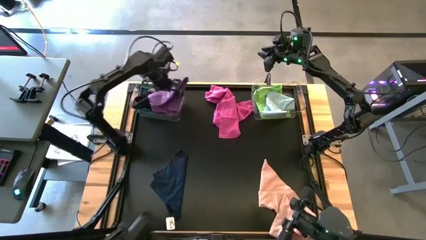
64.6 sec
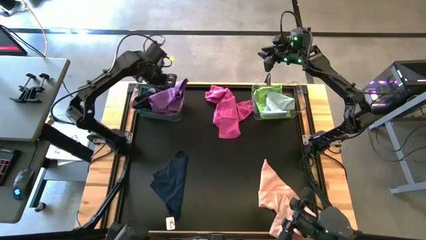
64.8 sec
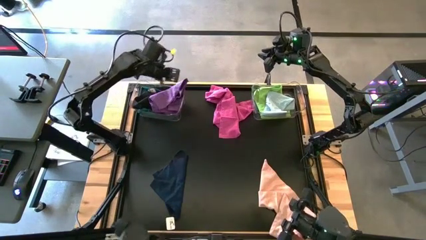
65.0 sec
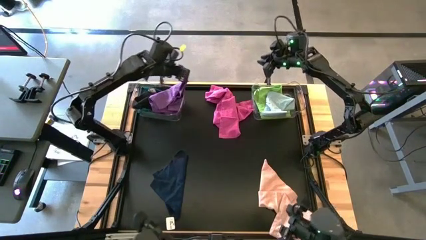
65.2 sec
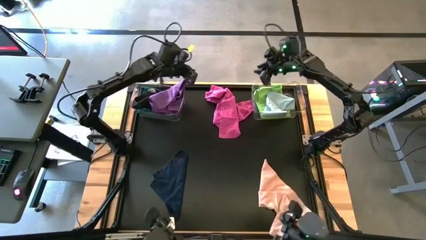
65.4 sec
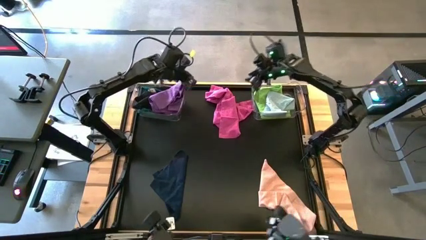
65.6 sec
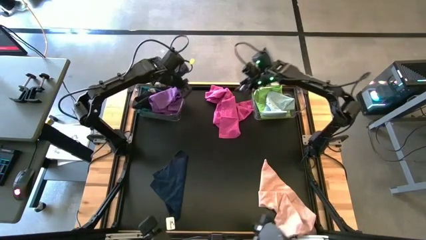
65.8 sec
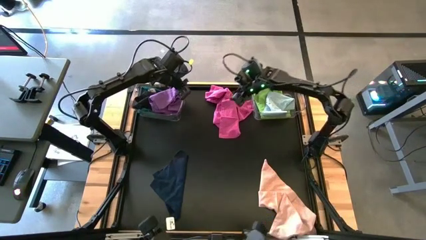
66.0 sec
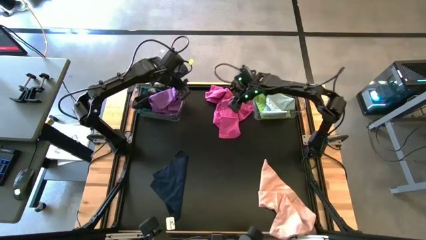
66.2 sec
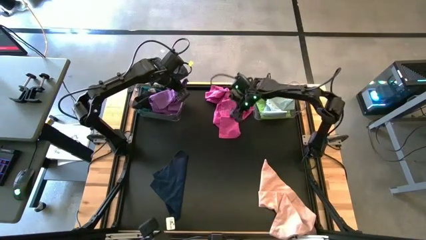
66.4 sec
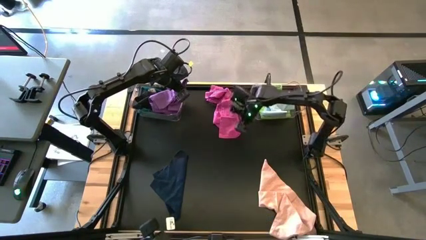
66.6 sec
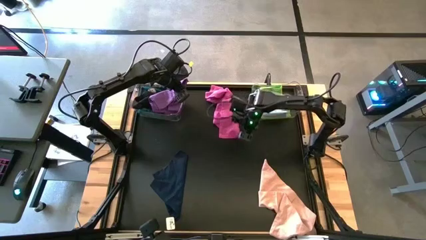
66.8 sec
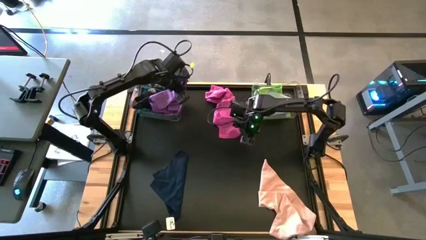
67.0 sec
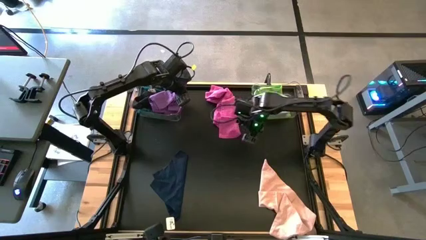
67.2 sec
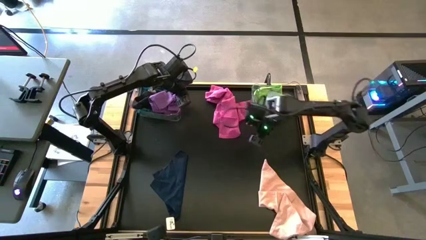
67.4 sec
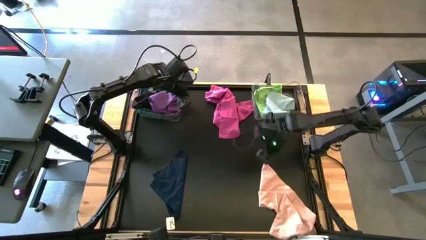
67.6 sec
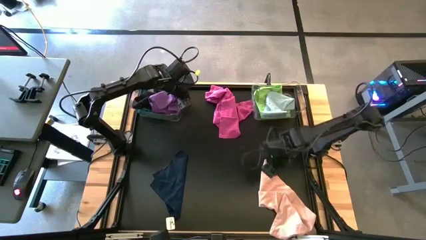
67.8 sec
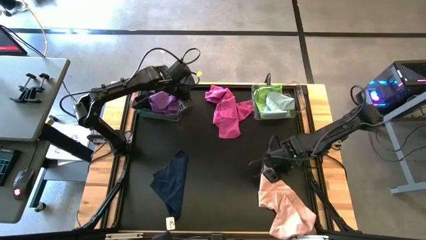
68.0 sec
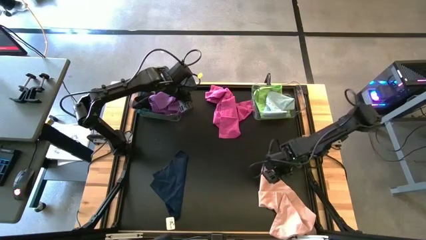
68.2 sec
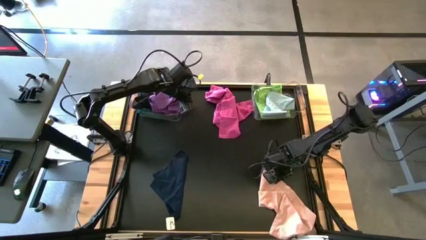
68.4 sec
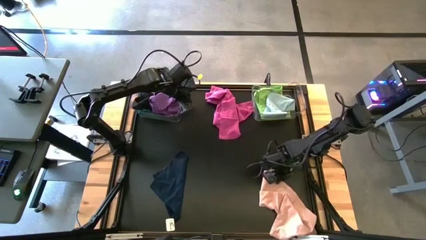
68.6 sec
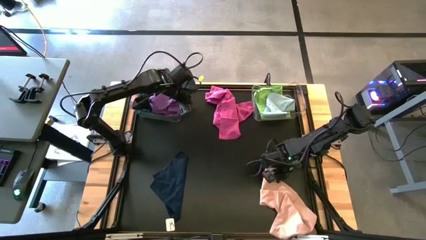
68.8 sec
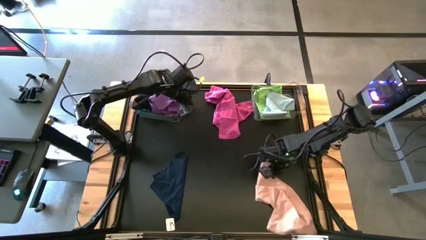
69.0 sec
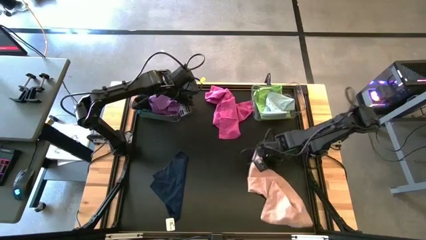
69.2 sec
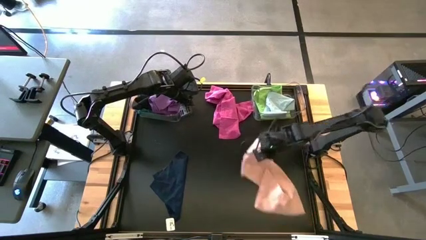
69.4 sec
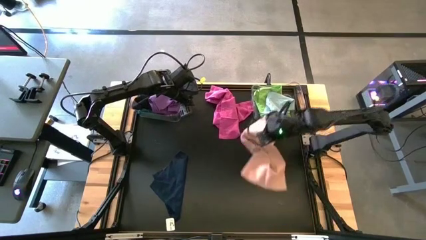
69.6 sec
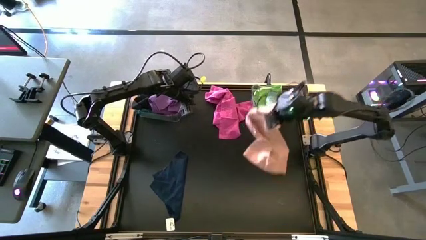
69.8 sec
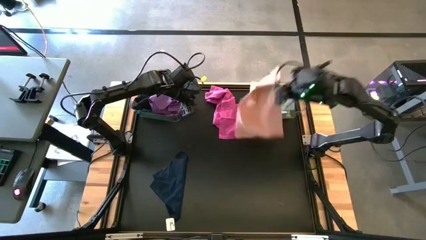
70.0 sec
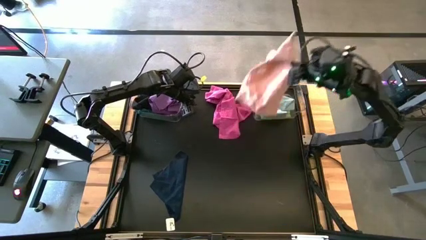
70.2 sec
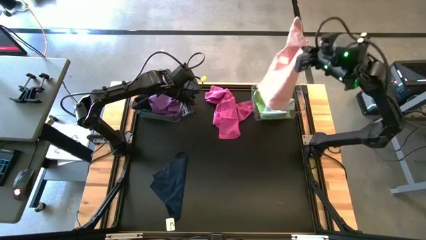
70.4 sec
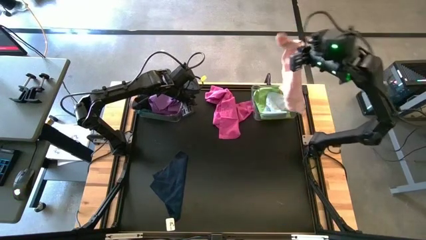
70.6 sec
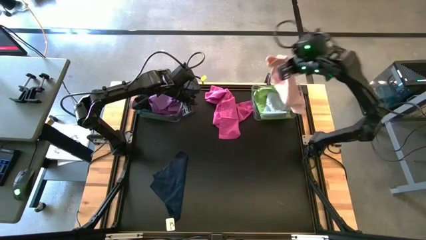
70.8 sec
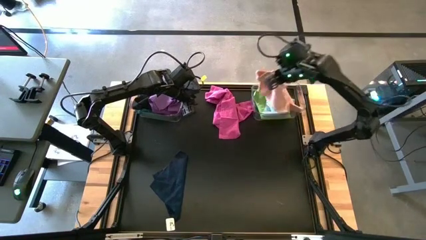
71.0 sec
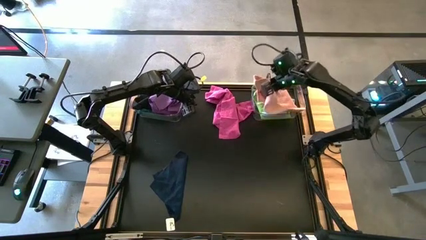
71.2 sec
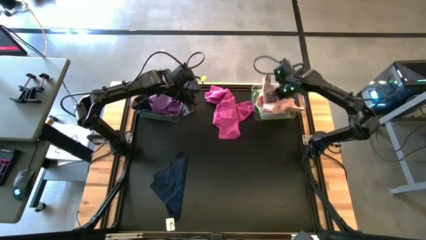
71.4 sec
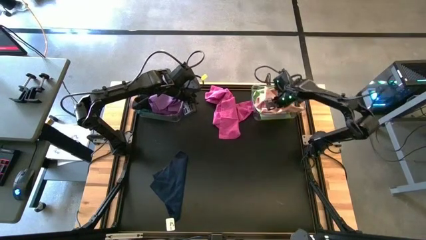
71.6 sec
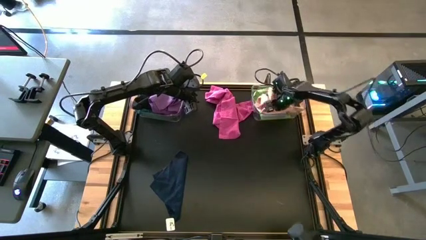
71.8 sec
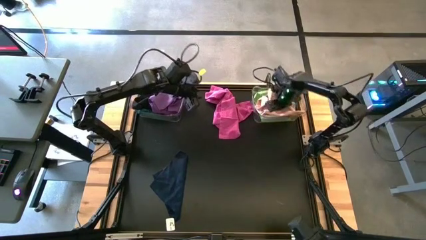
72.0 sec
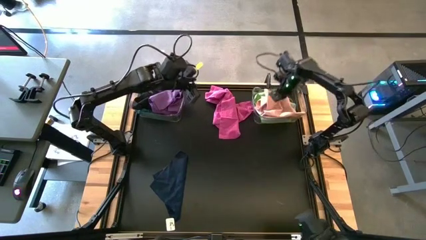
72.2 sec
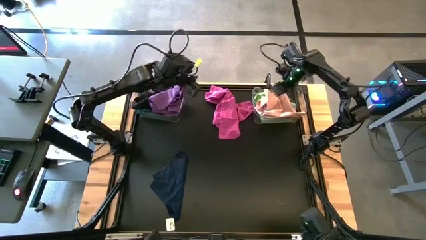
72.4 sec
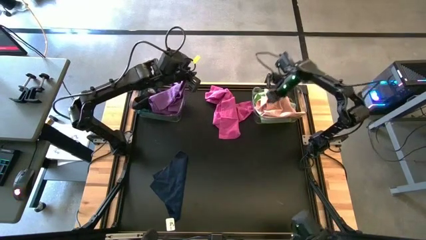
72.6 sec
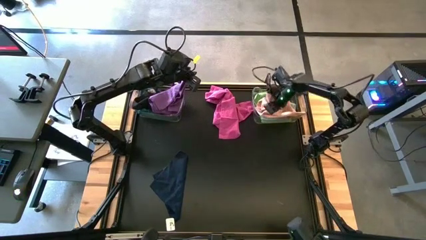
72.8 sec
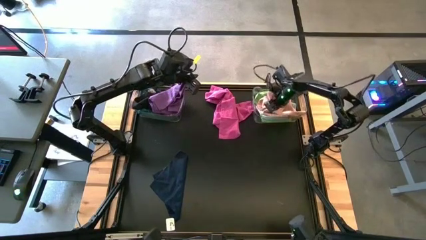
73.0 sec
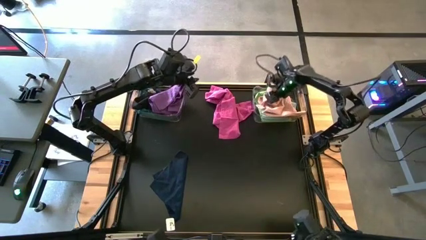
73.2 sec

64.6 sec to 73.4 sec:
Task: Sort towels by color in basket
Put the light pink microfiber towel into the right transparent bin

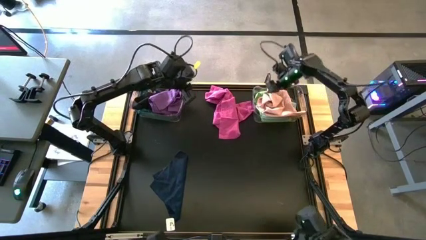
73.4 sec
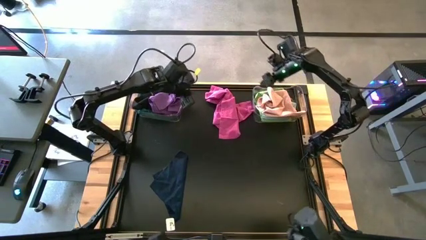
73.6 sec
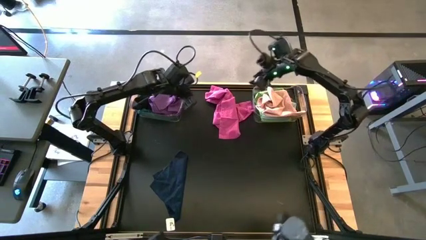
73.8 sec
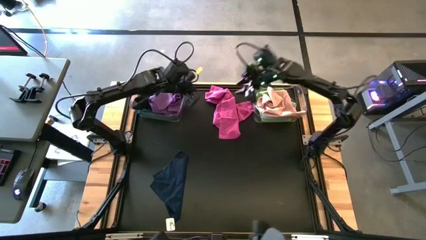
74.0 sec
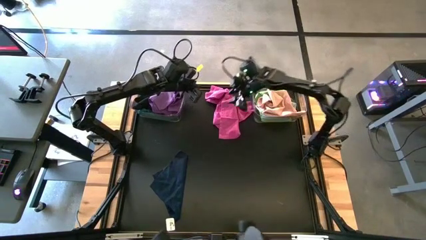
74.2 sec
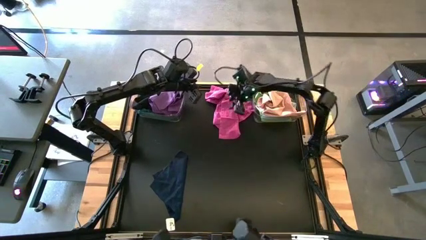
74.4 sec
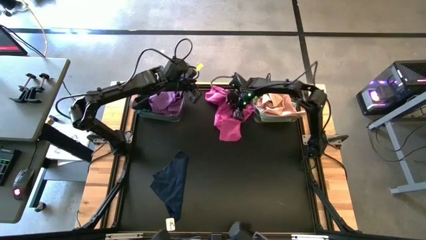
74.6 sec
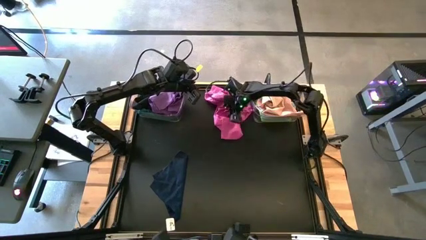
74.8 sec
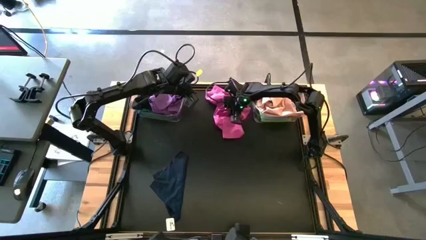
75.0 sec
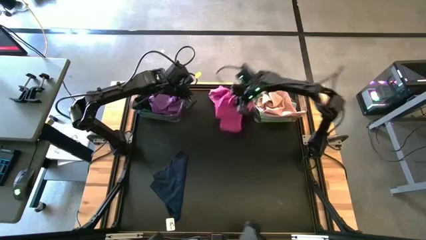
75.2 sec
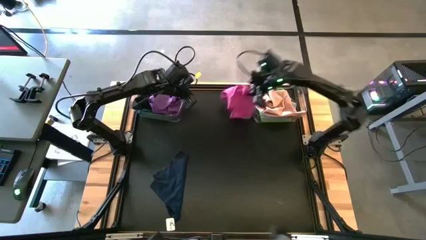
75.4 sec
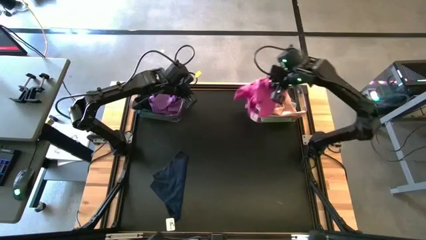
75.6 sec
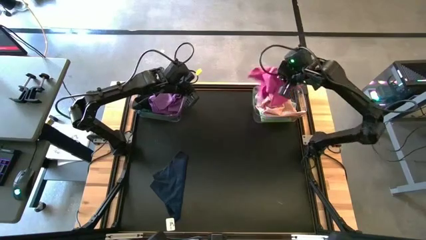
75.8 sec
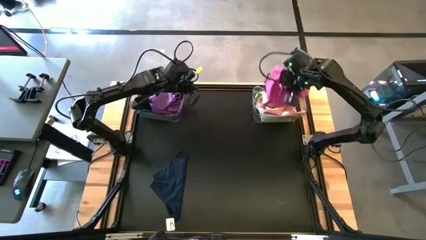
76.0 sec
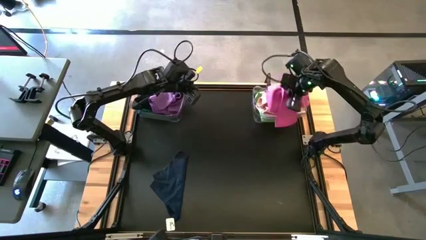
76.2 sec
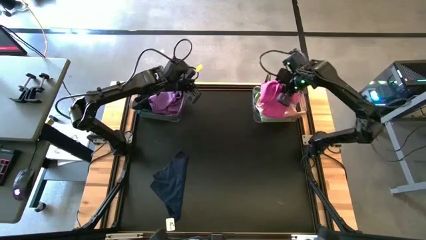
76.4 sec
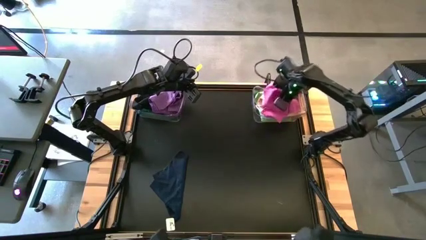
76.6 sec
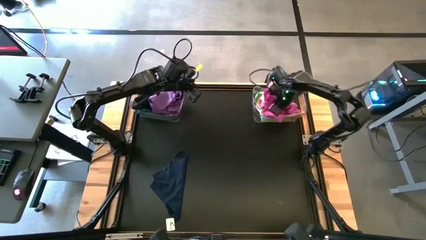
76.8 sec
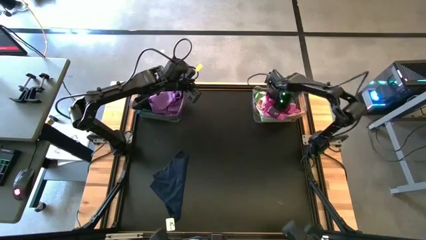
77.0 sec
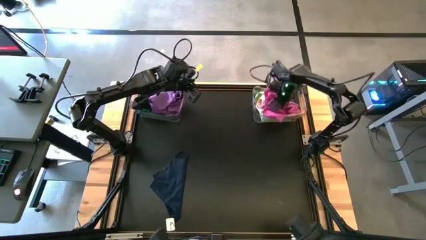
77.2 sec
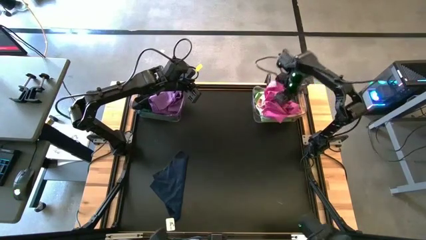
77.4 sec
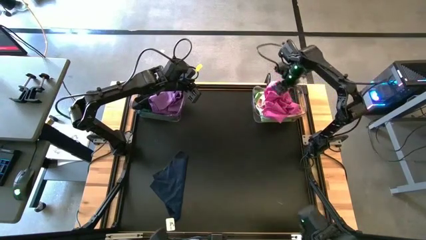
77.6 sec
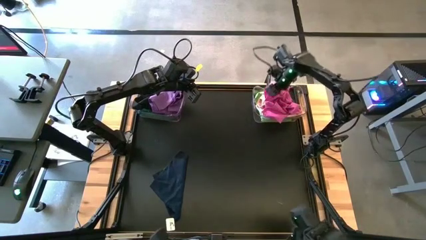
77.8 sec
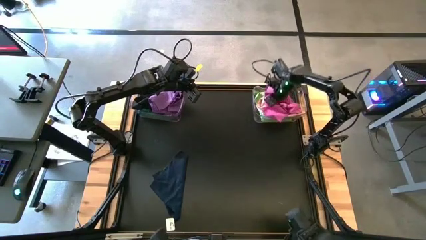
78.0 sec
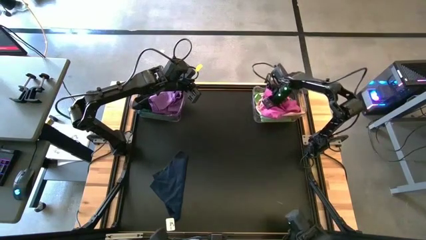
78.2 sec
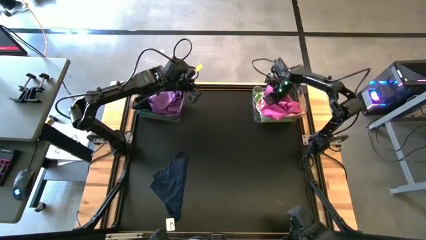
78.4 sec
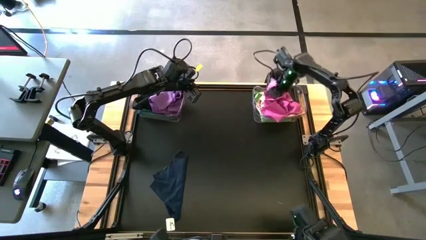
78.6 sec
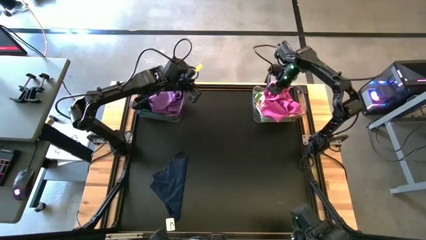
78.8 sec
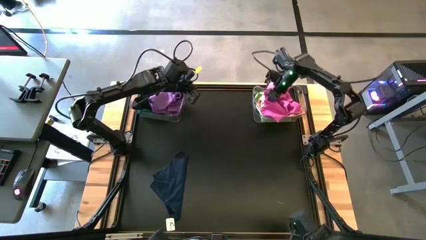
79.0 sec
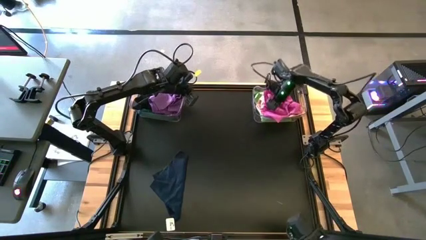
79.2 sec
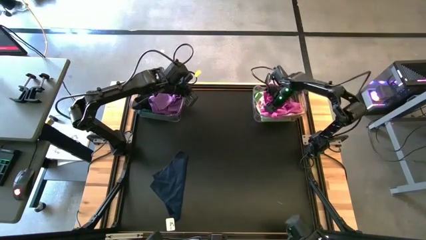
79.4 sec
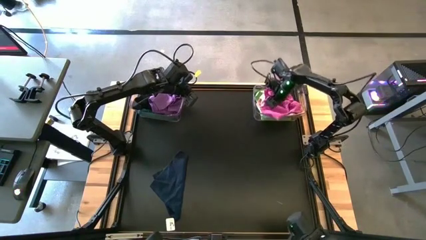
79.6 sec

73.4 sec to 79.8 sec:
Put the pink microfiber towel into the right transparent bin

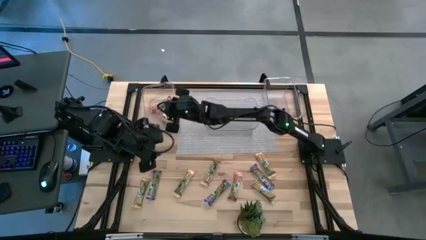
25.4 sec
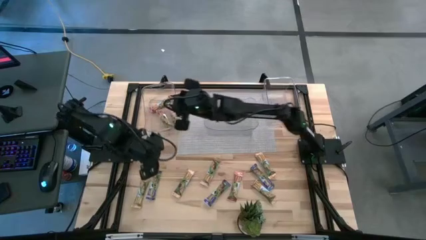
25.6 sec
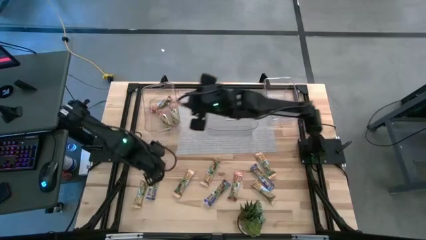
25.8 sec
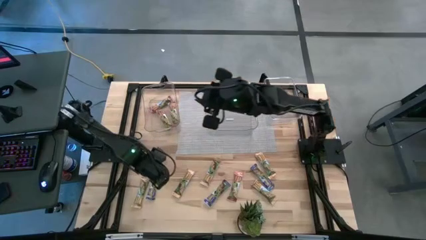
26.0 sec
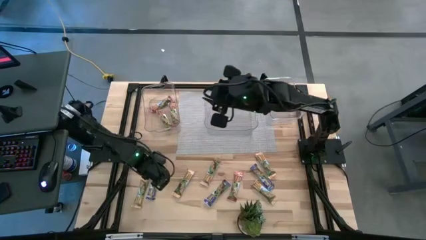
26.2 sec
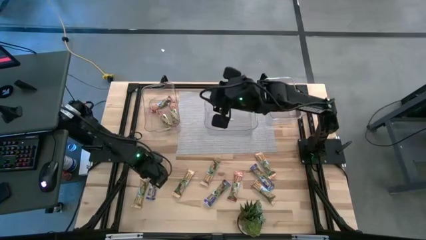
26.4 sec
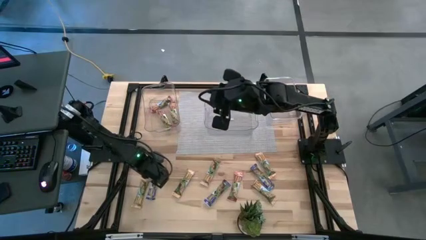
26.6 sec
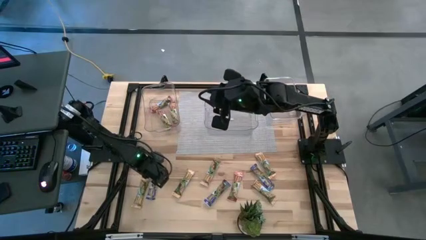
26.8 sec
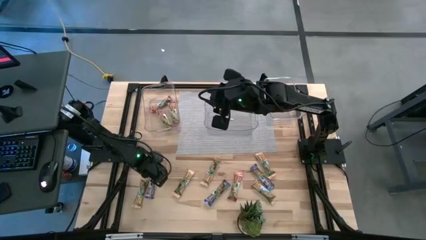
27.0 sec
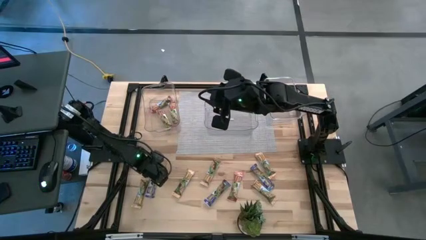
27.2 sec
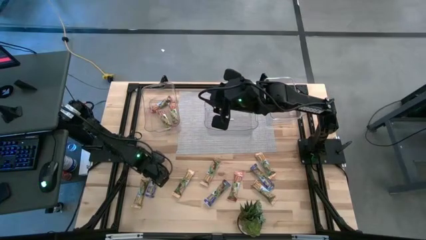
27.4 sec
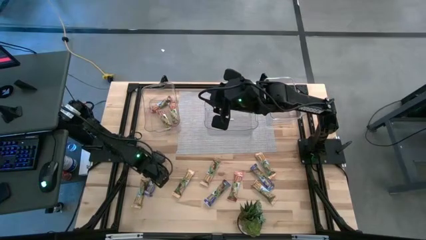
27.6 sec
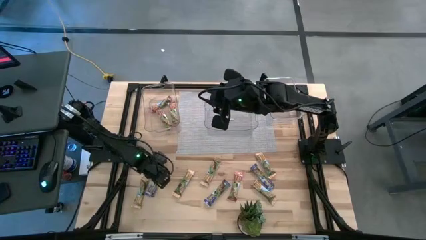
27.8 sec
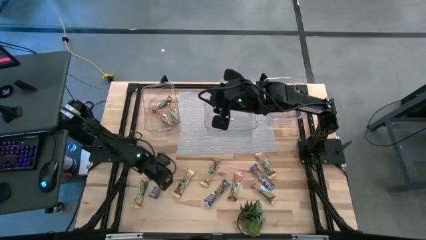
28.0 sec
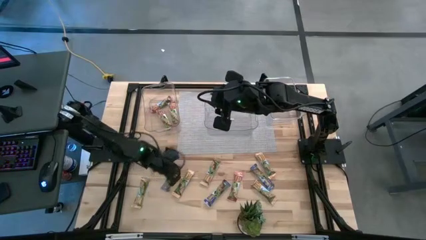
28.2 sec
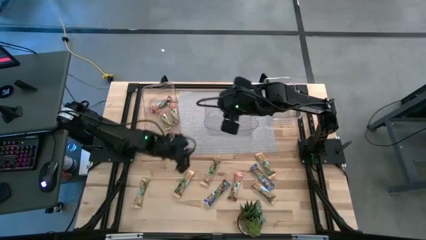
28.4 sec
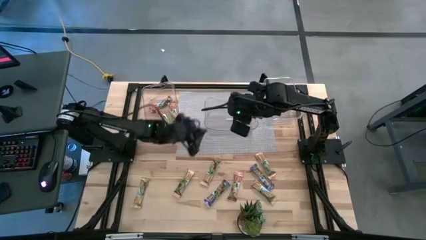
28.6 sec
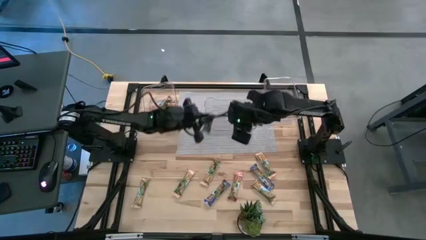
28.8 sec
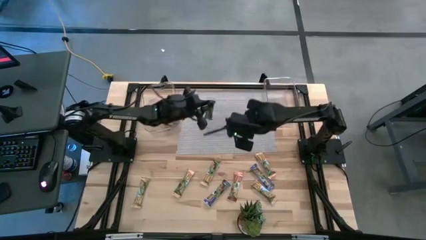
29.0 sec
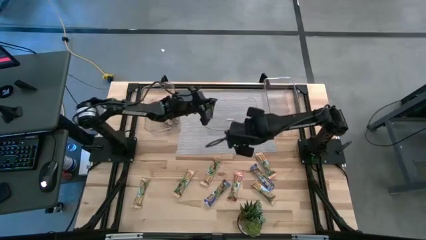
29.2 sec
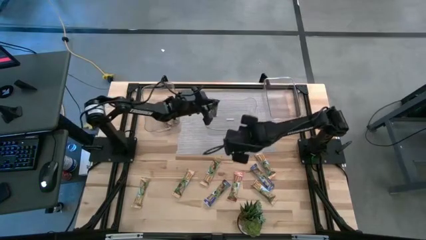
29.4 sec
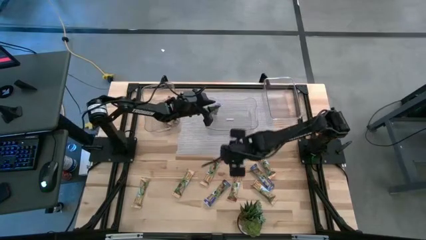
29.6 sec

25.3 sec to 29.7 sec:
Task: Pick and place Granola Bars by type
Put the blue granola bar into the middle transparent bin
